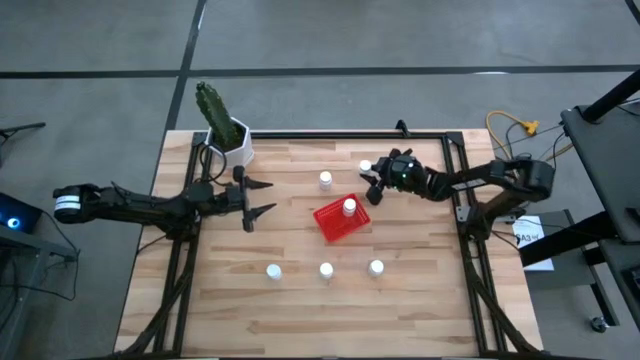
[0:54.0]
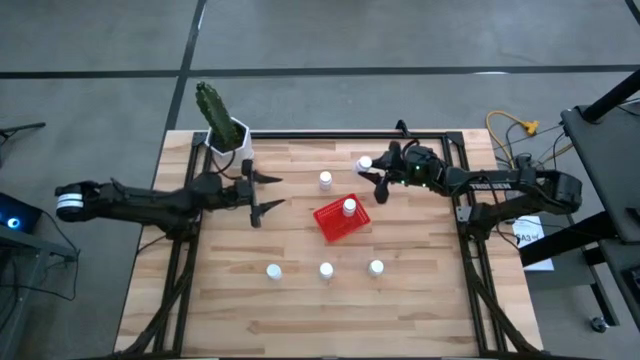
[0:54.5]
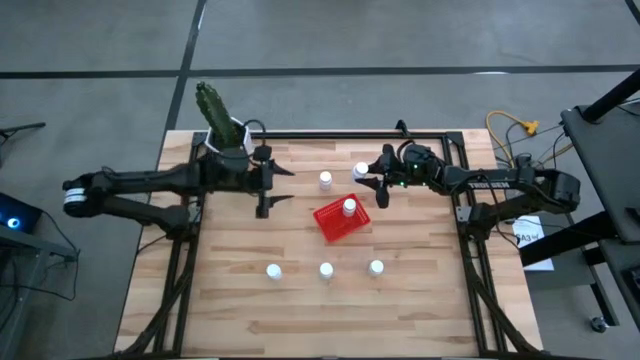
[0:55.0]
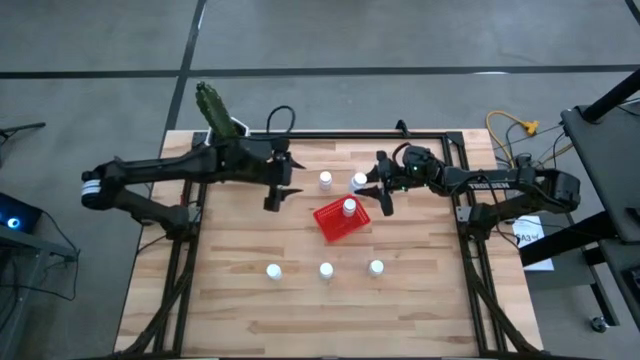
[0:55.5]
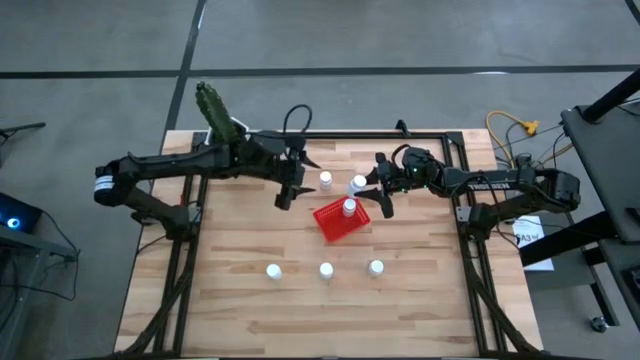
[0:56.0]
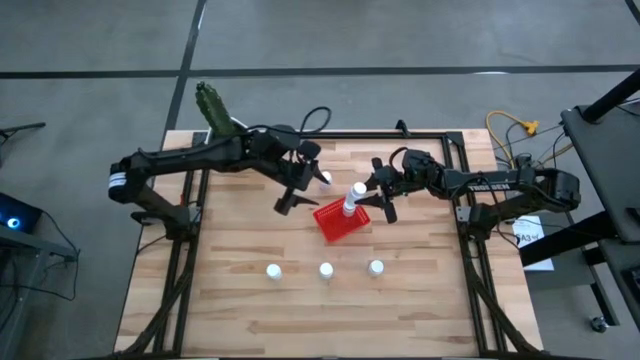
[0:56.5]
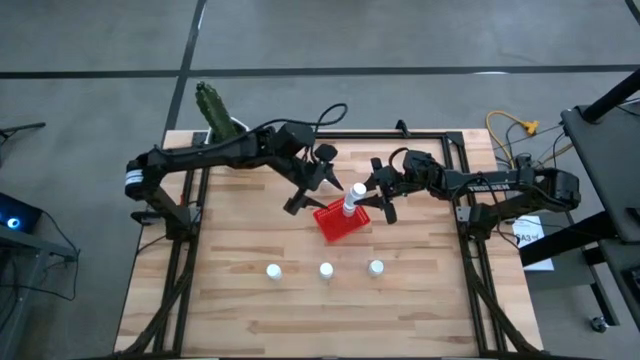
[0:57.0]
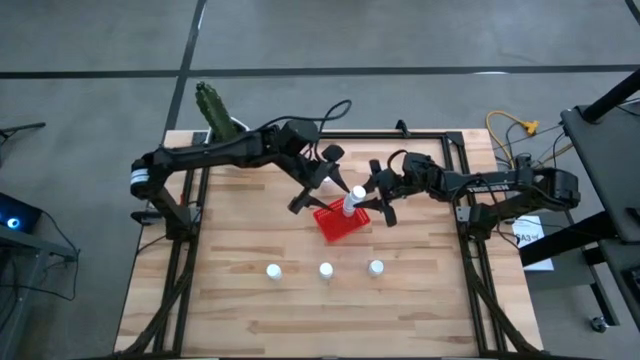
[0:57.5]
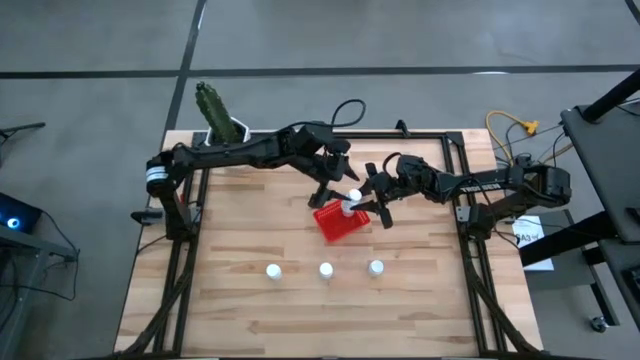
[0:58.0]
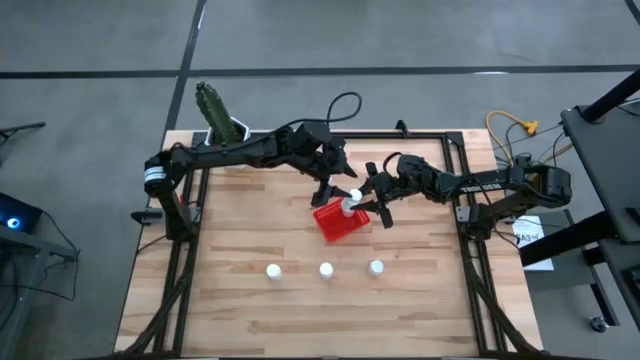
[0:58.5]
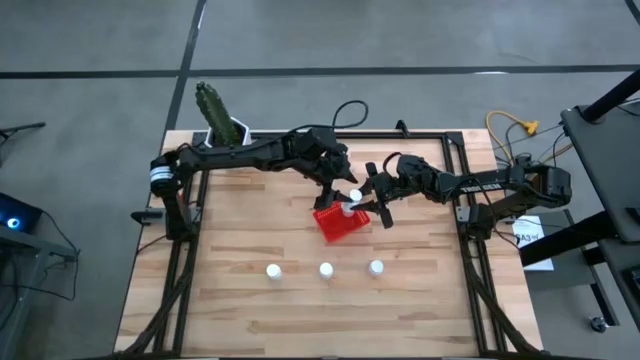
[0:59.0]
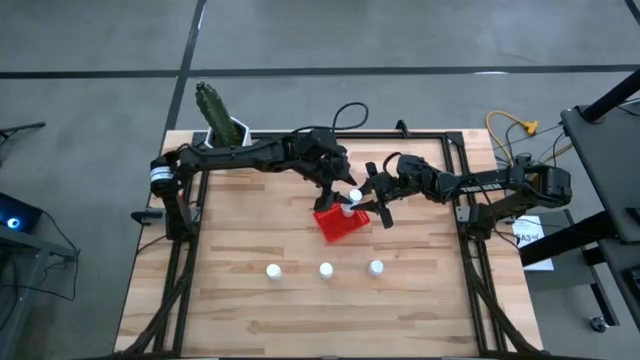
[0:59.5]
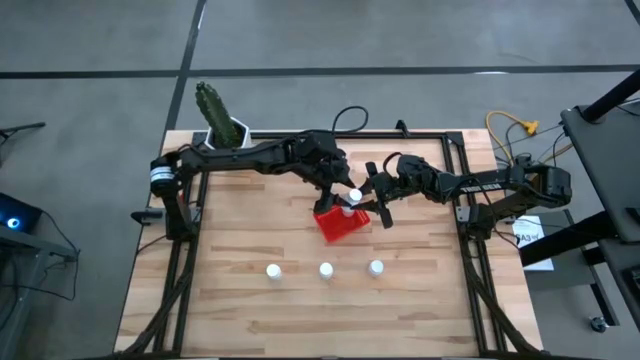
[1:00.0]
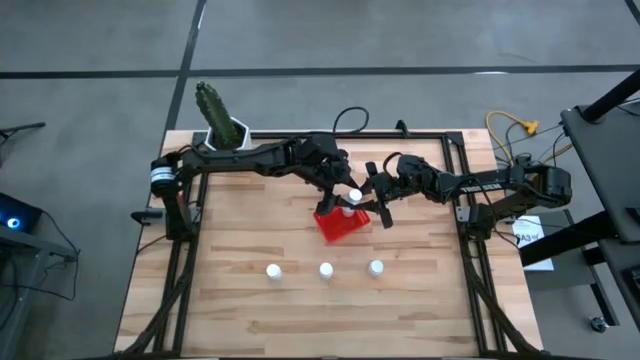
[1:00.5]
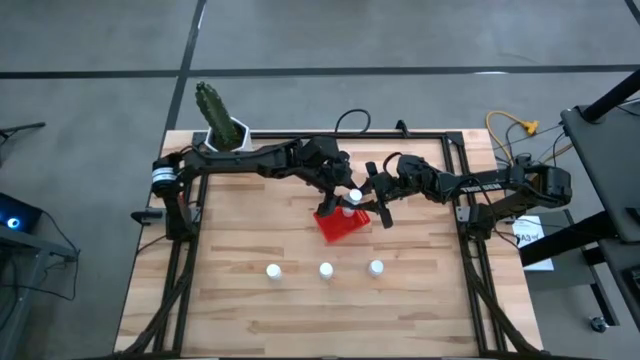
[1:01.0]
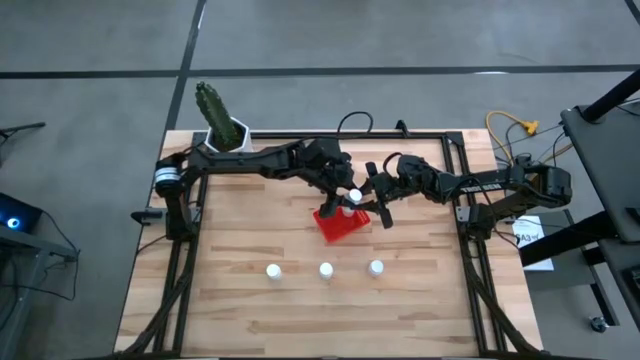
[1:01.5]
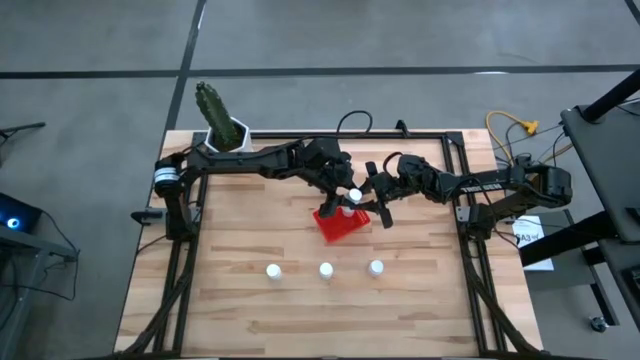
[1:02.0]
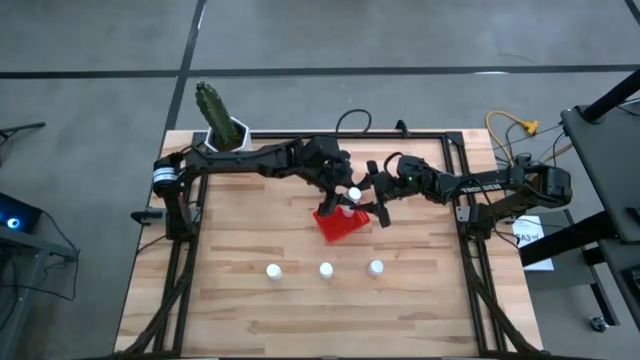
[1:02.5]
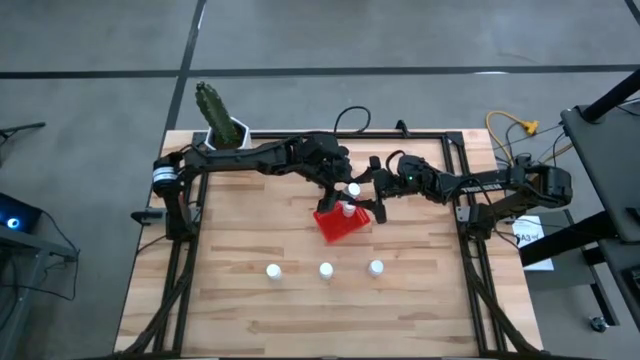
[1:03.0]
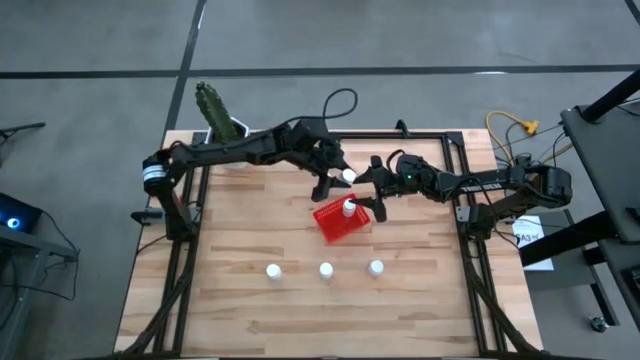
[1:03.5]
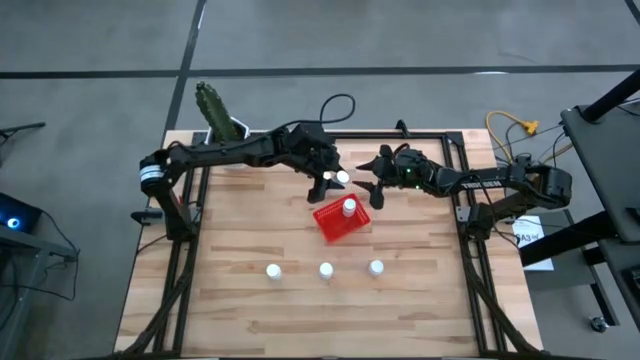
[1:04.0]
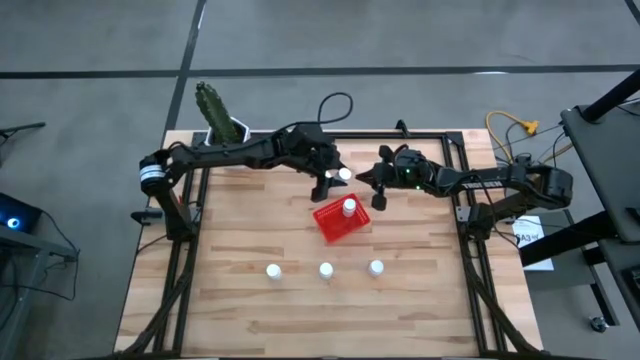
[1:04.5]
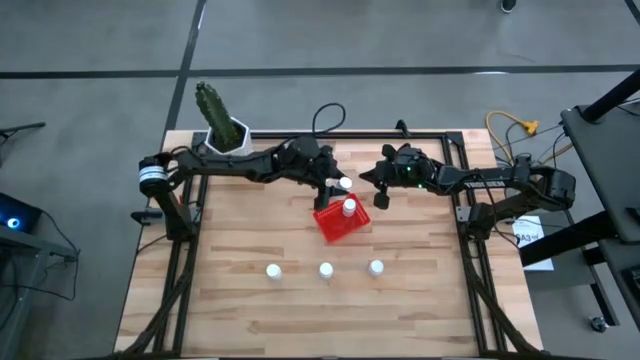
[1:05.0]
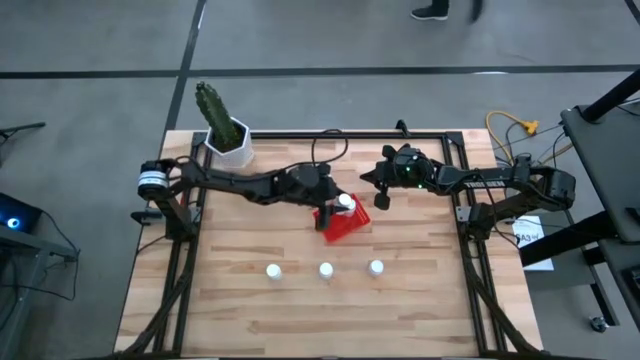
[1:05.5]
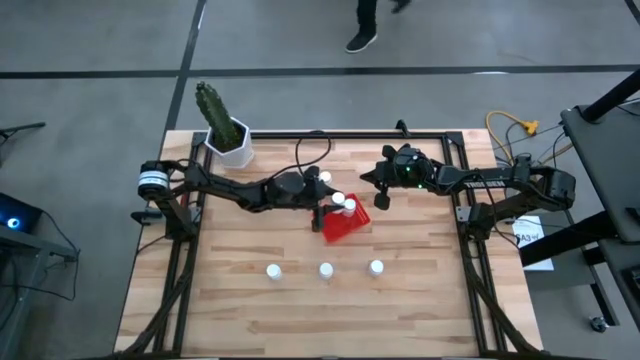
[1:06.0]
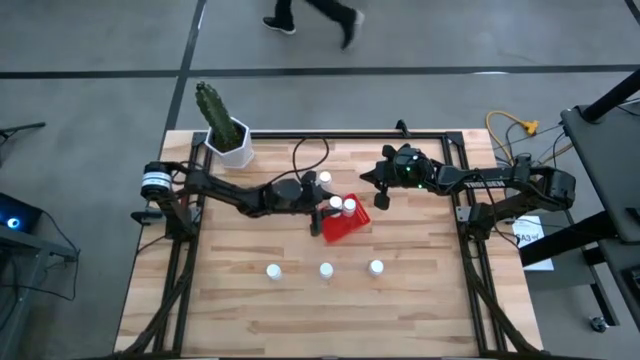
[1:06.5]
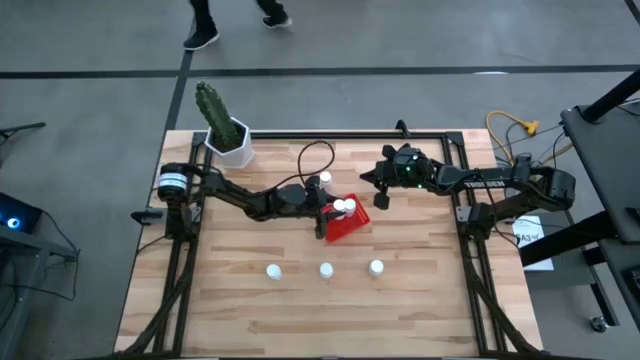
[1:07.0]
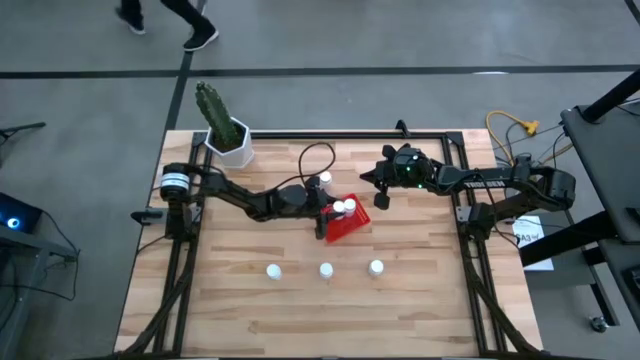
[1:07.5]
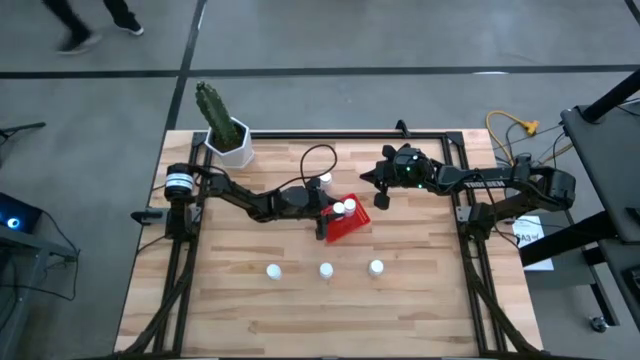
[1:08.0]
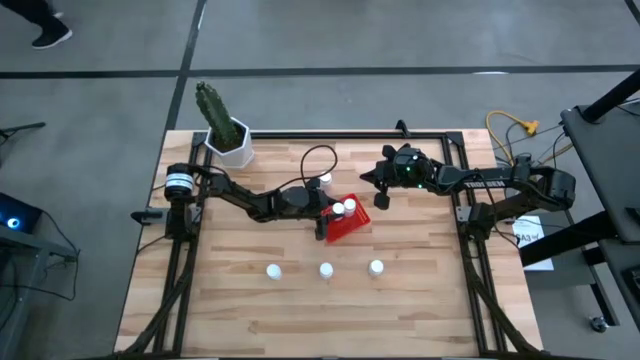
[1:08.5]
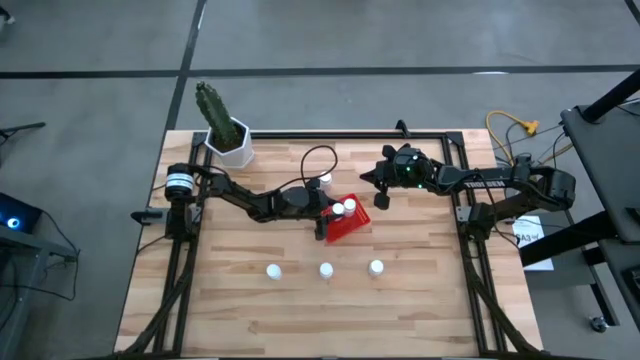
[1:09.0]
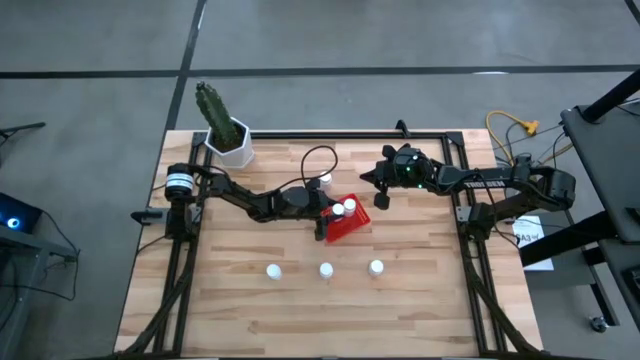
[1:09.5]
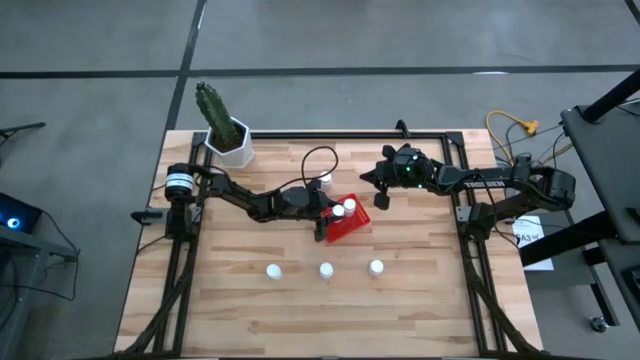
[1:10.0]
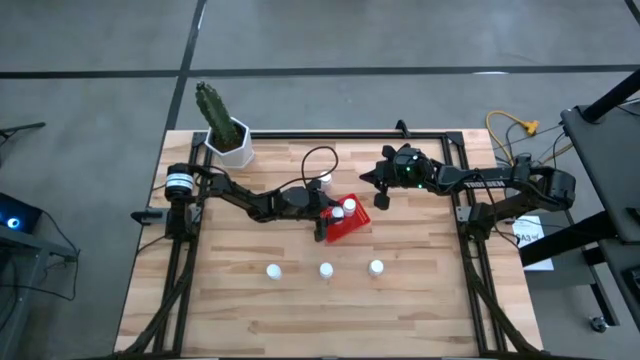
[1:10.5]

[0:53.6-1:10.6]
Task: Pick and place pill bottles into a basket
Put the white pill bottle into the red bin
